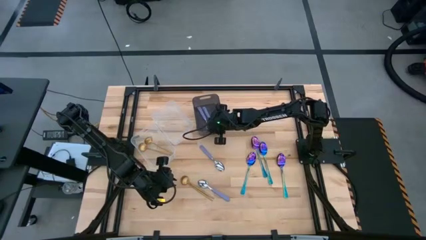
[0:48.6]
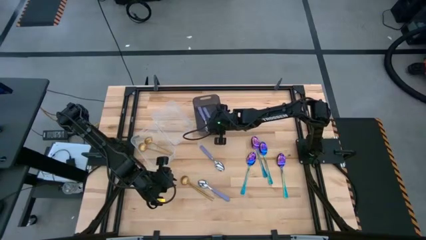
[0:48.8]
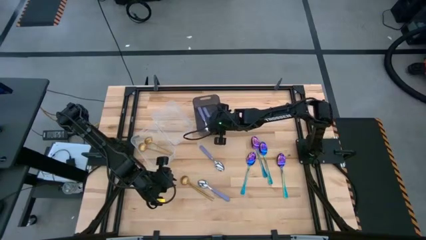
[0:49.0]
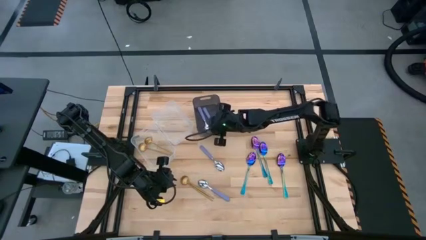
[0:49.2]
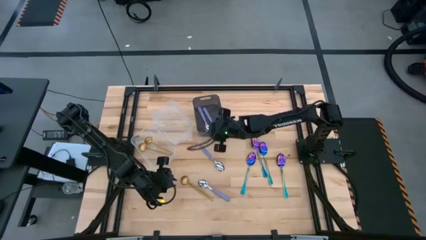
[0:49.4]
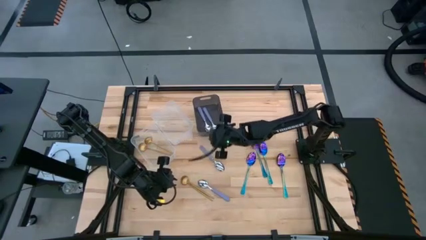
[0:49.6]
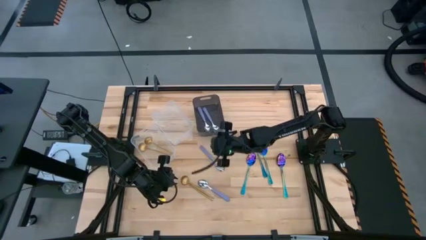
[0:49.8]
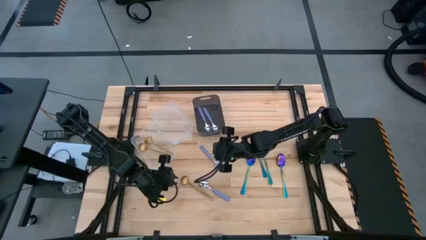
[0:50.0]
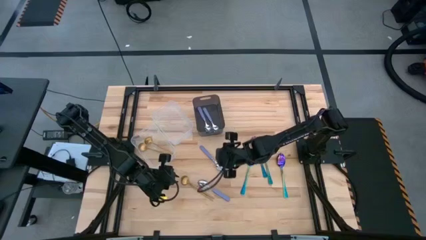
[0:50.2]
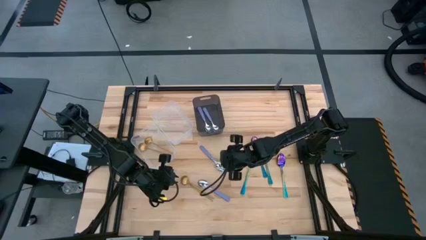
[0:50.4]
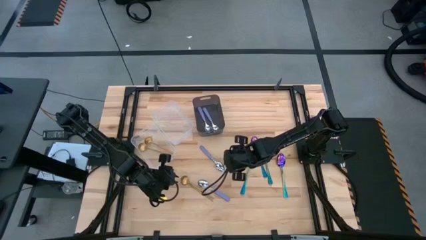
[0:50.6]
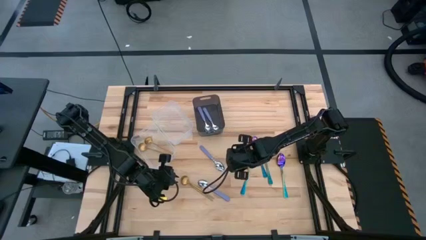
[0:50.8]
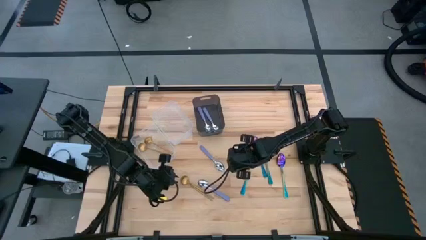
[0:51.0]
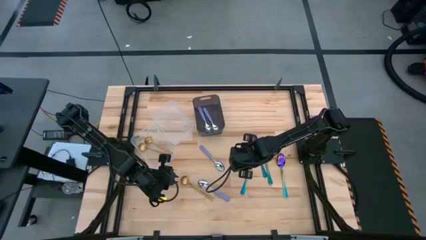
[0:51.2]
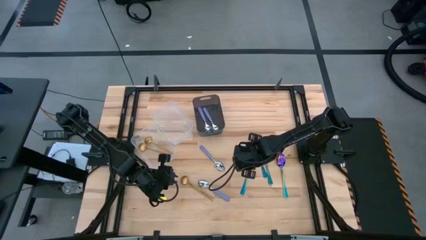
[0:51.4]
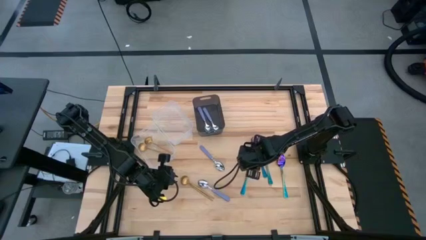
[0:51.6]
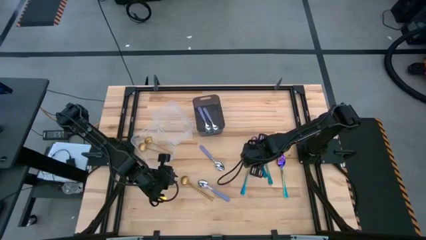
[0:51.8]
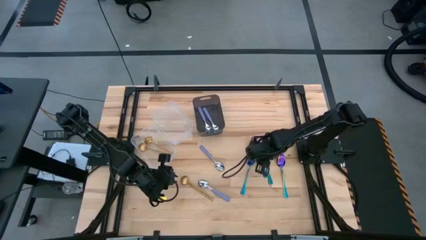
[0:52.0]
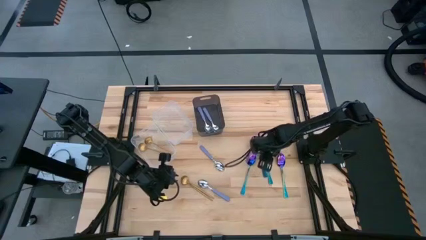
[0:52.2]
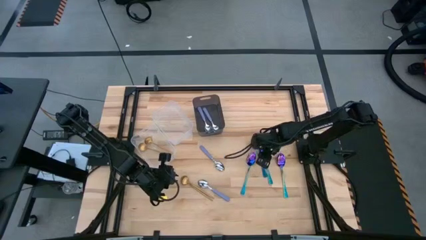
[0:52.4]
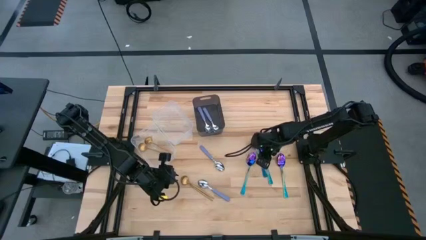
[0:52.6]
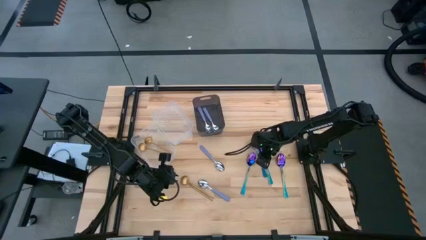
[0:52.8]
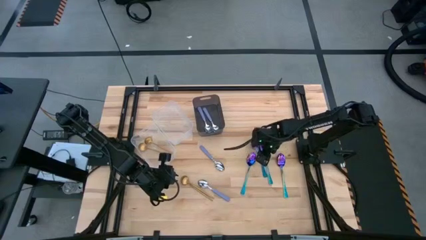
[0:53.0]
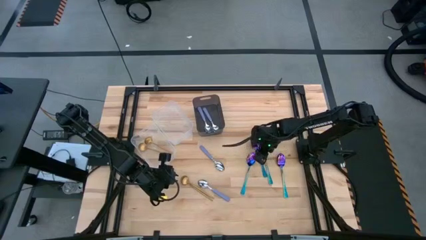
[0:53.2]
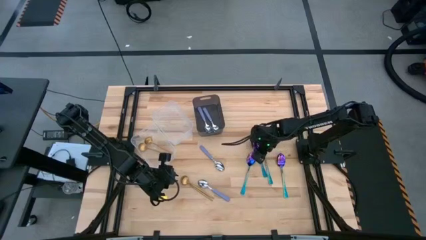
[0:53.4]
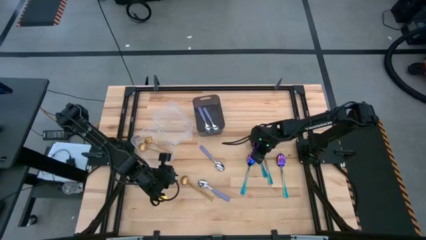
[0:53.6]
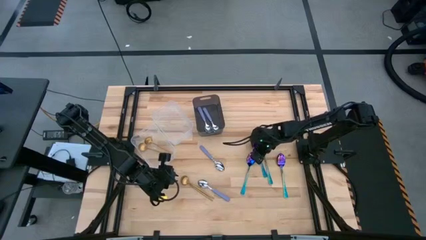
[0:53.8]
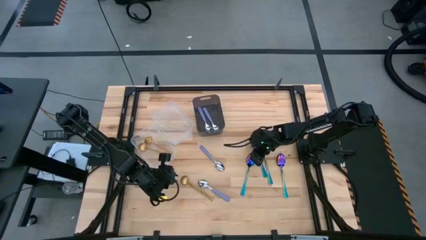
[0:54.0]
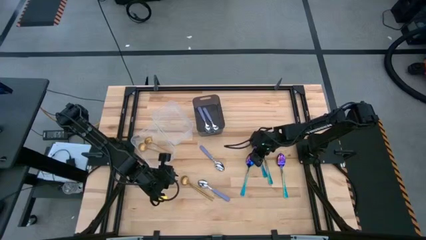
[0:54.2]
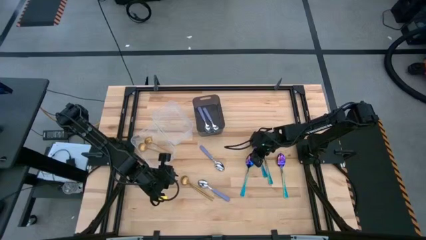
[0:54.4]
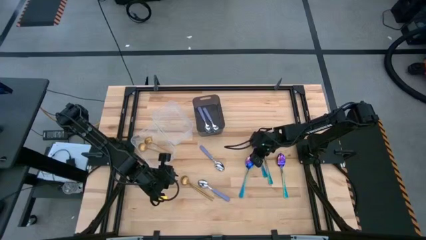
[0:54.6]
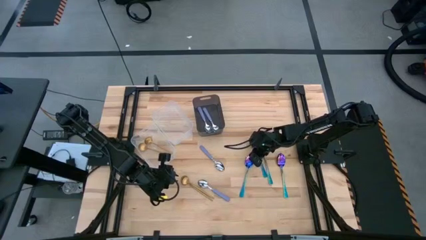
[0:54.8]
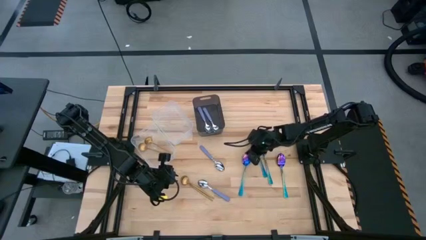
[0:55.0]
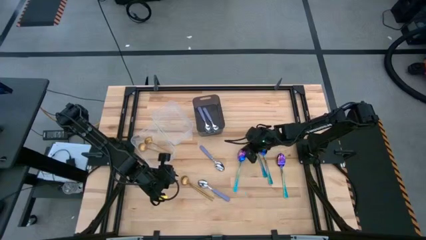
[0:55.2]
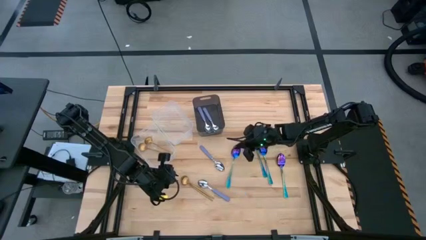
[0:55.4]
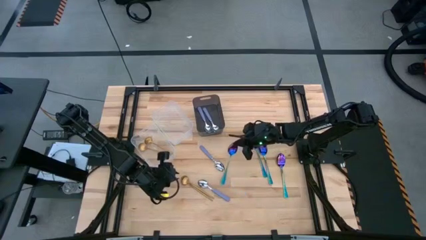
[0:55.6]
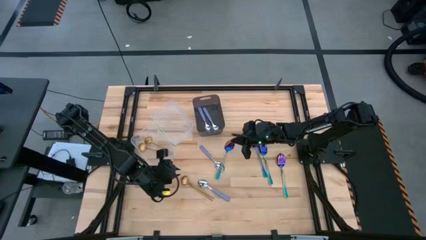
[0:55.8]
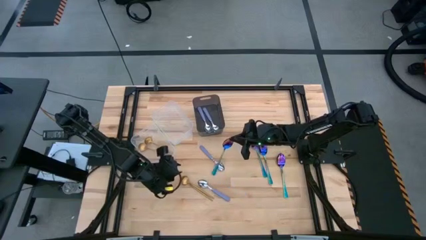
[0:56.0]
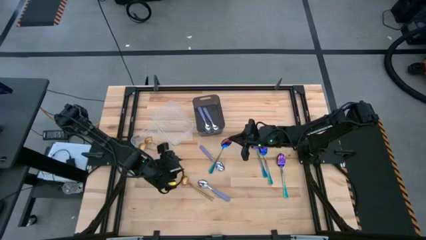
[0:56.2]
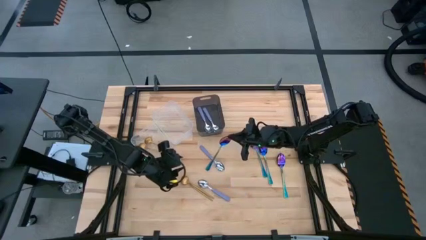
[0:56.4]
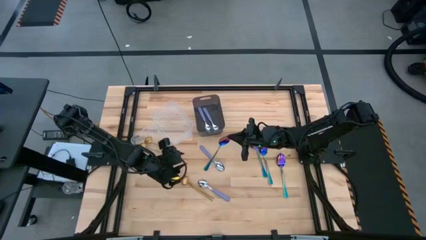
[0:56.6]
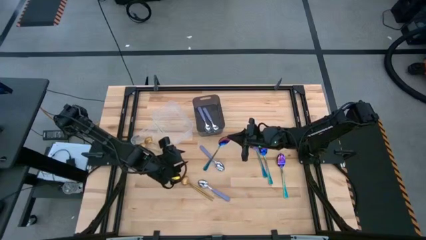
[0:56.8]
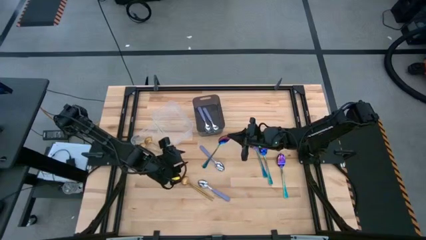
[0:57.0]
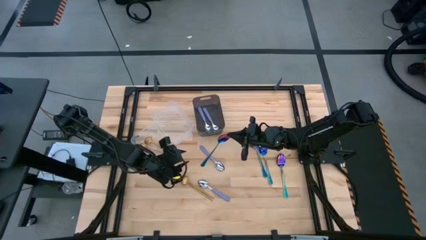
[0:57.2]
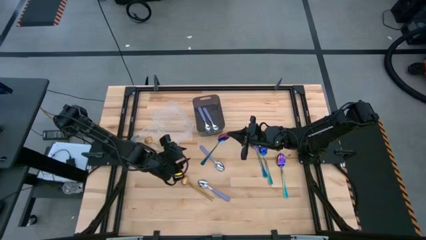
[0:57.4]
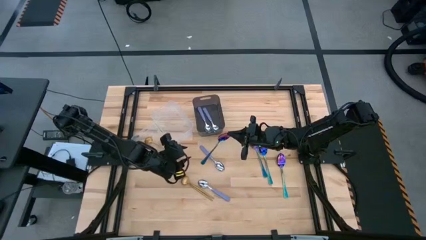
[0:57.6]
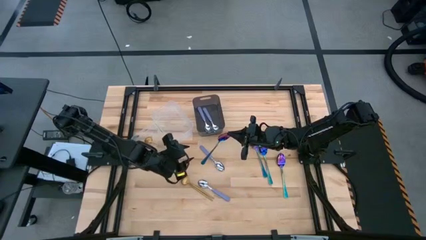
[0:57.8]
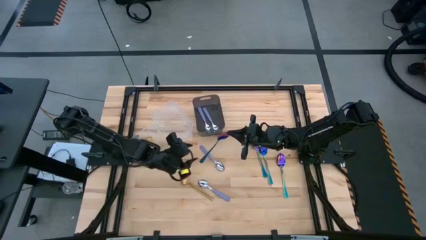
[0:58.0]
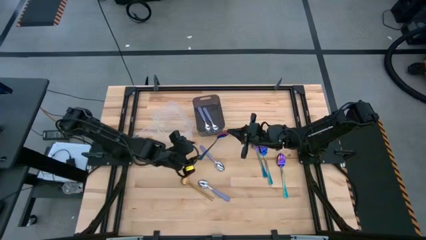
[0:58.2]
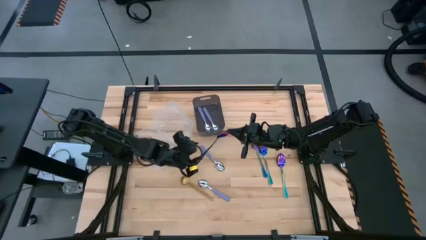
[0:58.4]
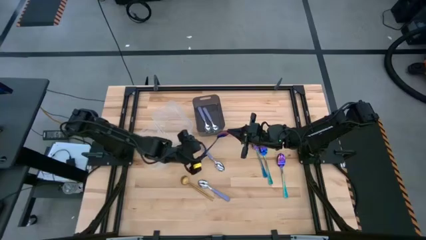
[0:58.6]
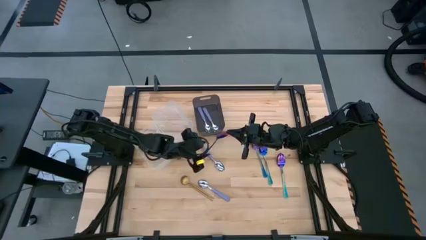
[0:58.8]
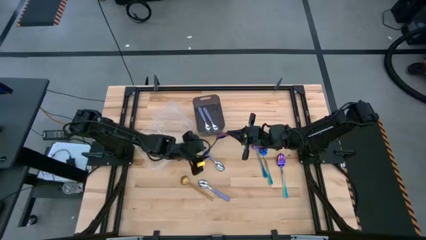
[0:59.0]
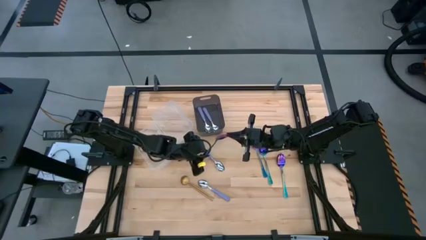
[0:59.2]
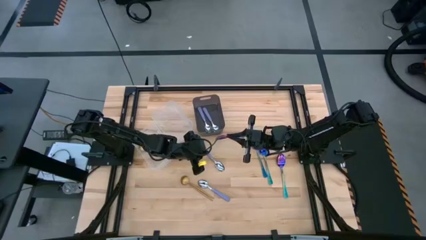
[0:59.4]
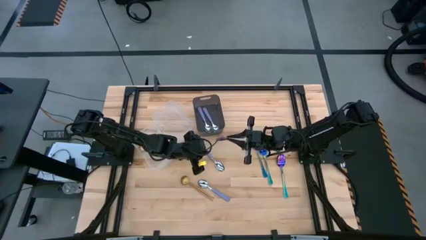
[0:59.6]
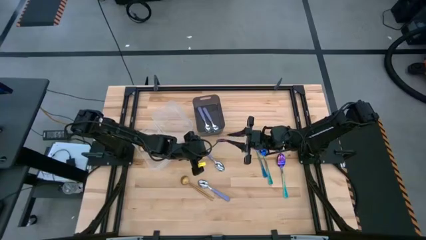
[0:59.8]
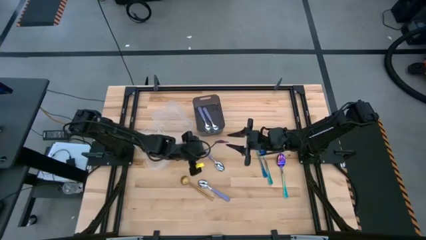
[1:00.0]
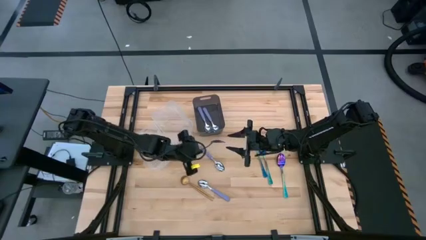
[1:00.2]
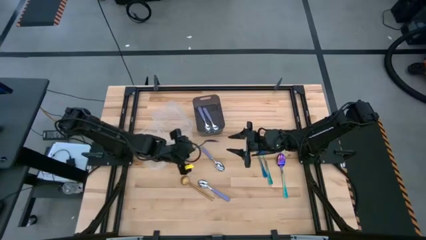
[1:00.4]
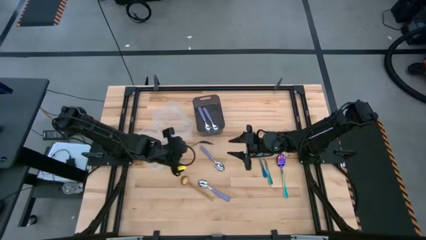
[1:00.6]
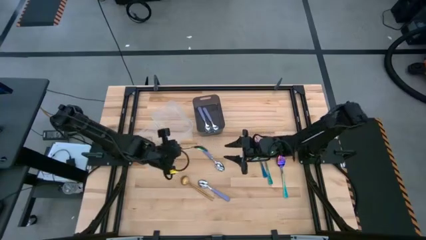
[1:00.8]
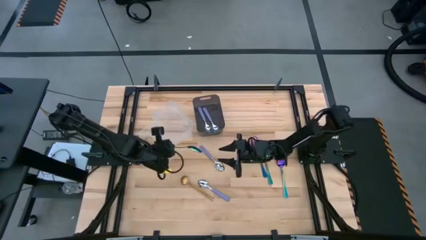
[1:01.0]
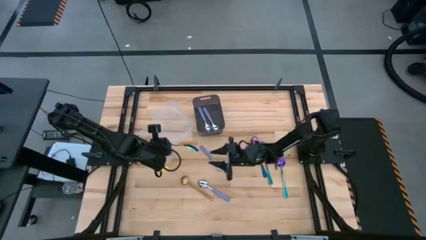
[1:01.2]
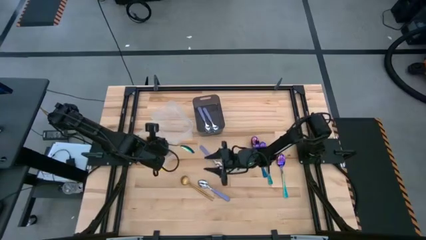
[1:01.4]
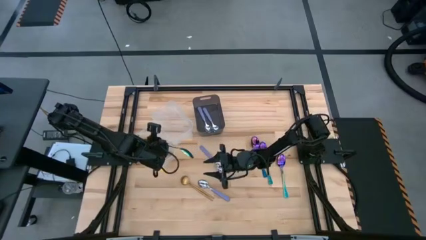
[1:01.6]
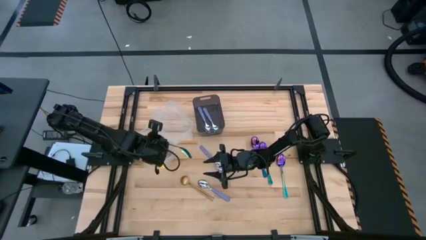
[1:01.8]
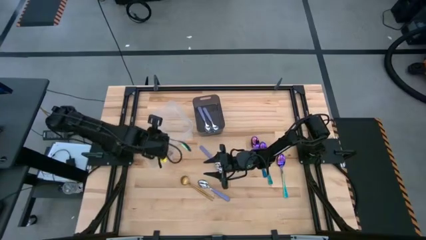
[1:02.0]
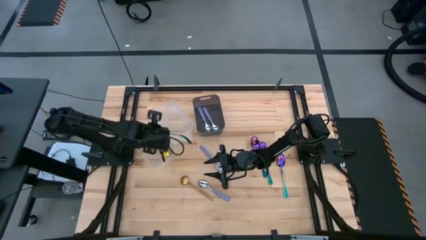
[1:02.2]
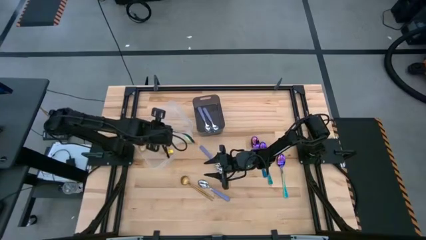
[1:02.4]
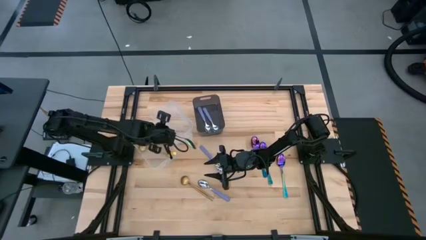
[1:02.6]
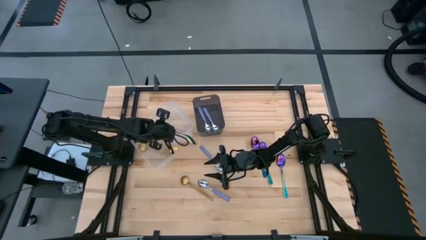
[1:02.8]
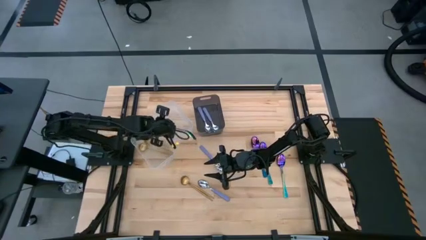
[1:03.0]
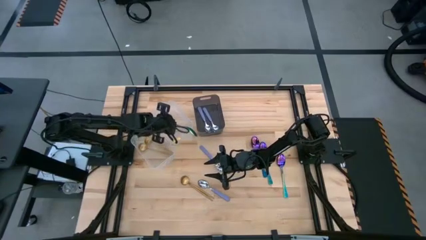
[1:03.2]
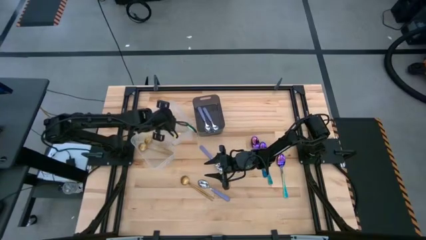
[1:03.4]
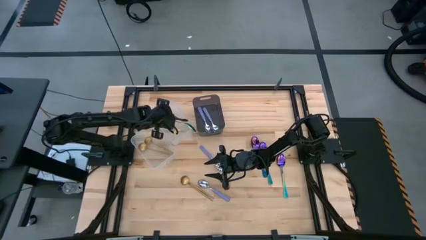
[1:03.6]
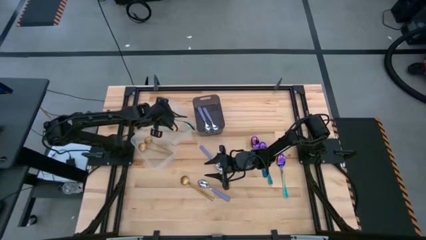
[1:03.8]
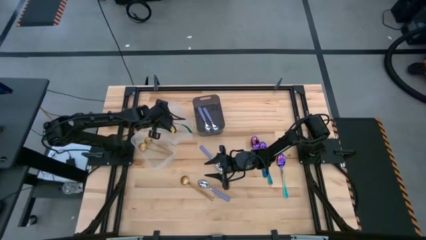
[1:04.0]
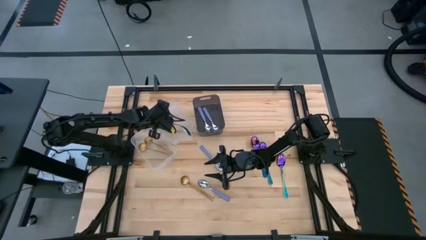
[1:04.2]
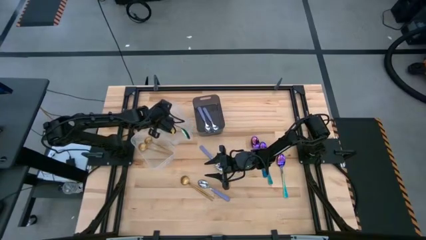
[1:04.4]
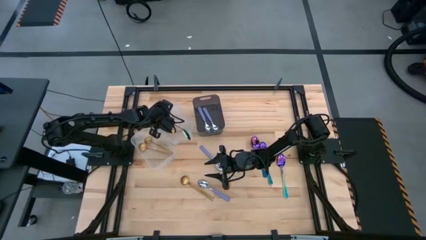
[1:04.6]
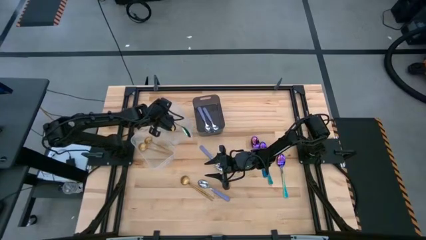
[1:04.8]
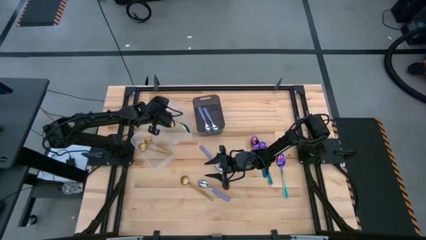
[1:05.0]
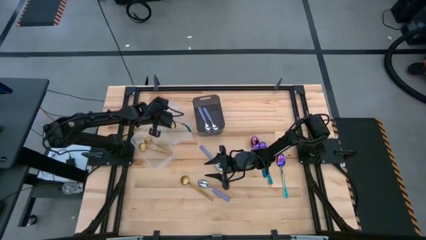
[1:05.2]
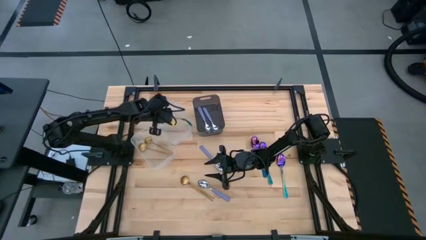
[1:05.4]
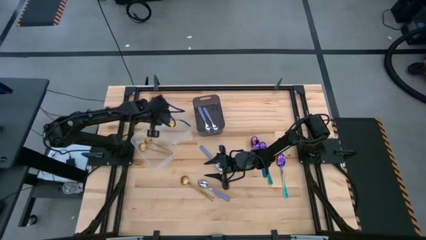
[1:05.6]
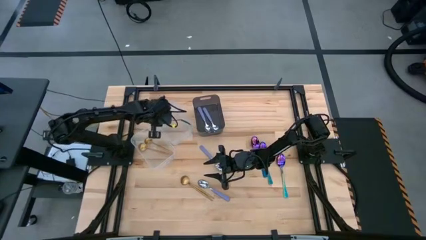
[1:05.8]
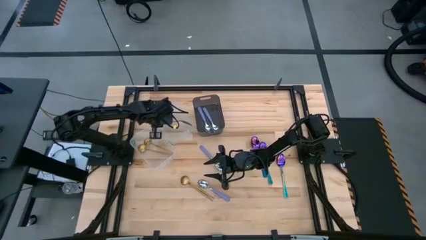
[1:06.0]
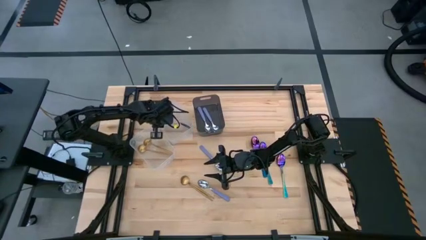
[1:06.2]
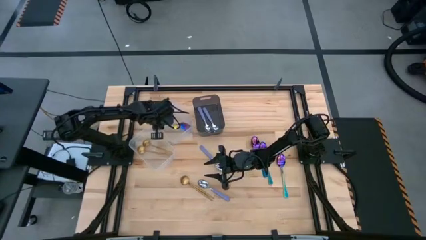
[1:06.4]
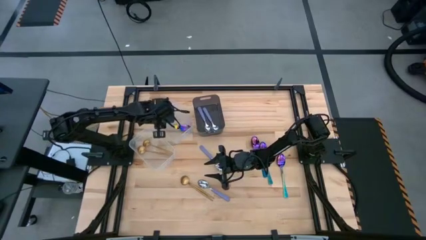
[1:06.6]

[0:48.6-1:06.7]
Task: Sort silverware by color (type)
Put the blue spoon into the top transparent bin
